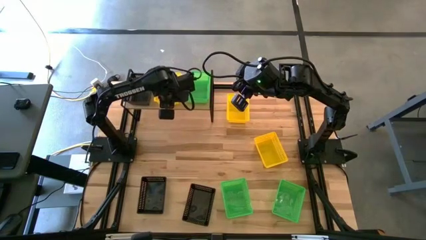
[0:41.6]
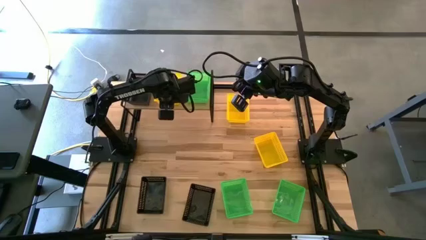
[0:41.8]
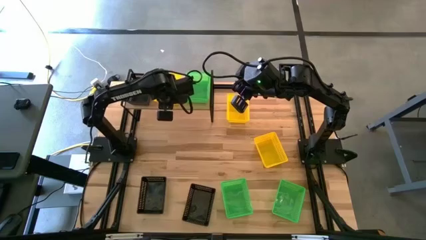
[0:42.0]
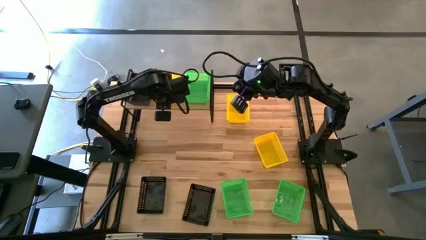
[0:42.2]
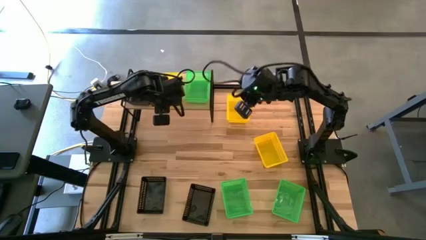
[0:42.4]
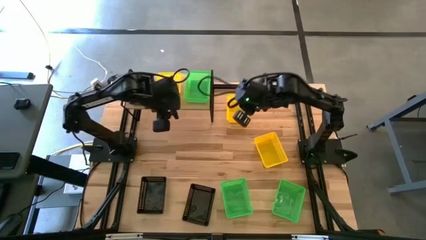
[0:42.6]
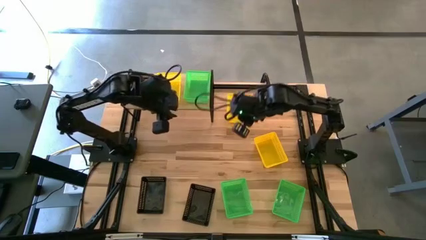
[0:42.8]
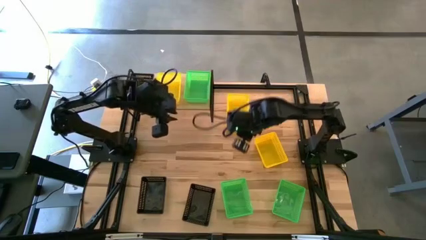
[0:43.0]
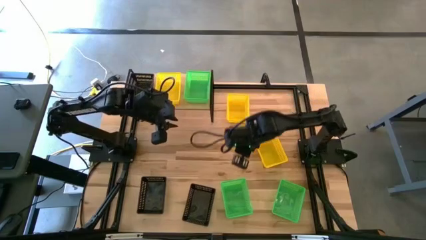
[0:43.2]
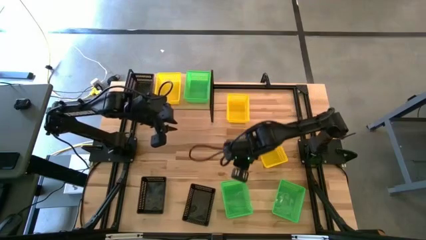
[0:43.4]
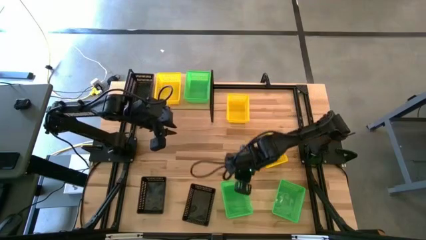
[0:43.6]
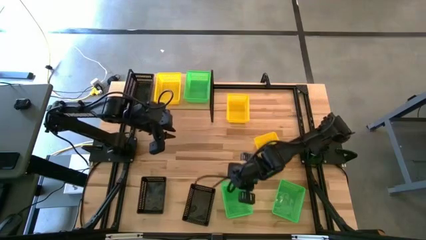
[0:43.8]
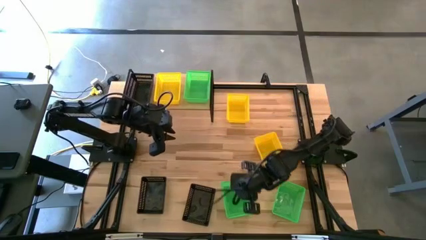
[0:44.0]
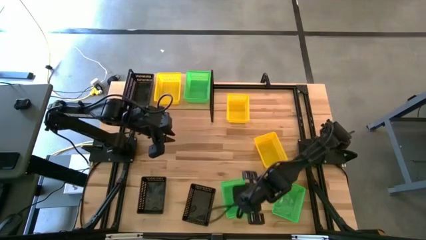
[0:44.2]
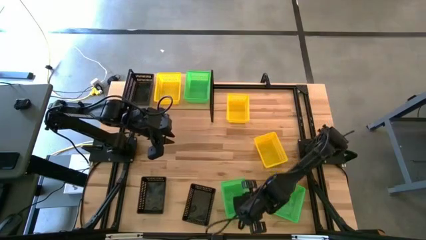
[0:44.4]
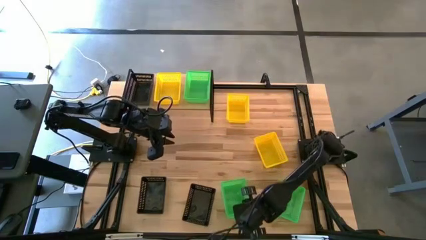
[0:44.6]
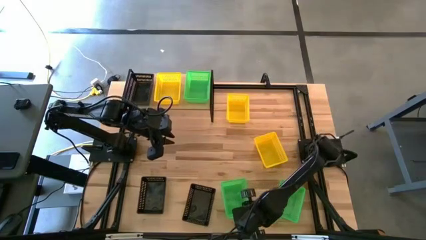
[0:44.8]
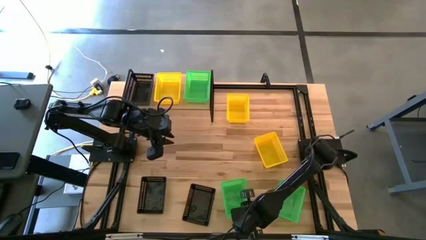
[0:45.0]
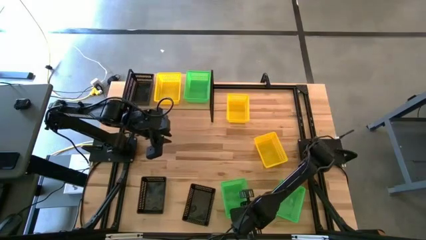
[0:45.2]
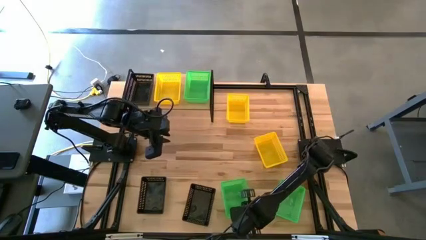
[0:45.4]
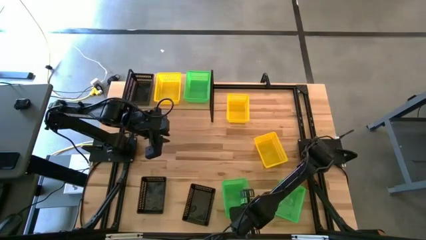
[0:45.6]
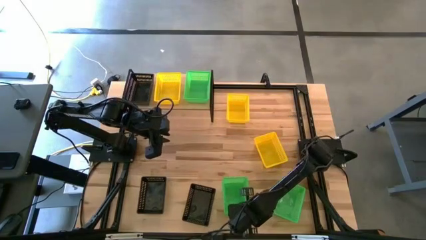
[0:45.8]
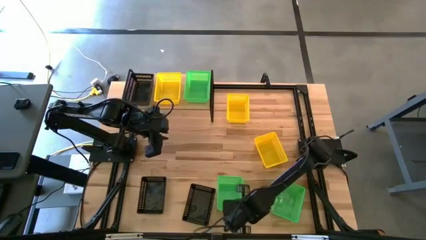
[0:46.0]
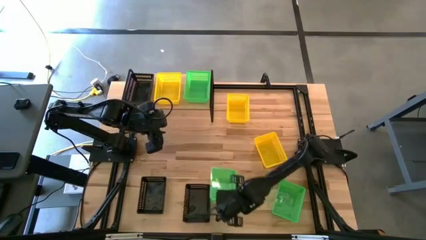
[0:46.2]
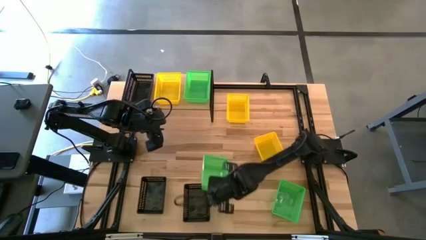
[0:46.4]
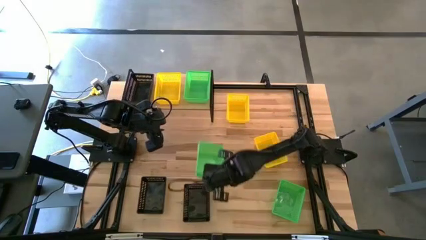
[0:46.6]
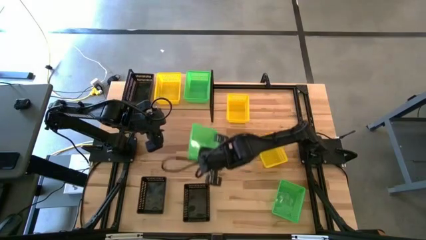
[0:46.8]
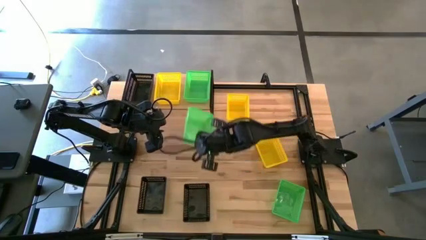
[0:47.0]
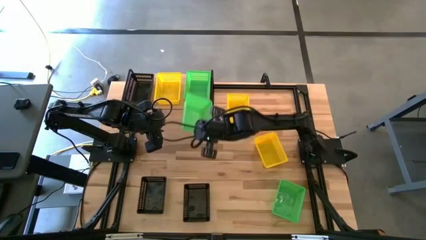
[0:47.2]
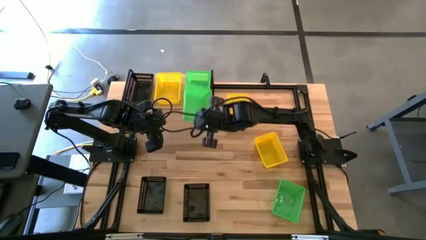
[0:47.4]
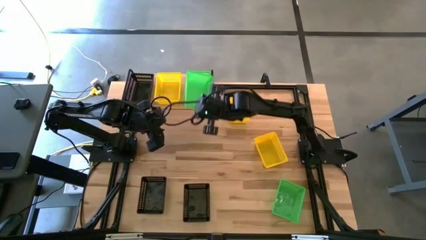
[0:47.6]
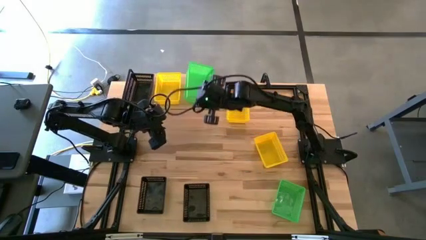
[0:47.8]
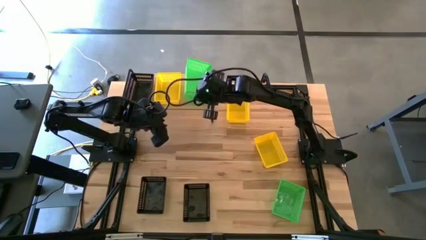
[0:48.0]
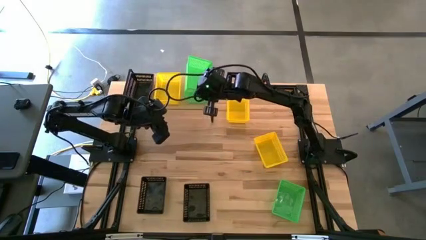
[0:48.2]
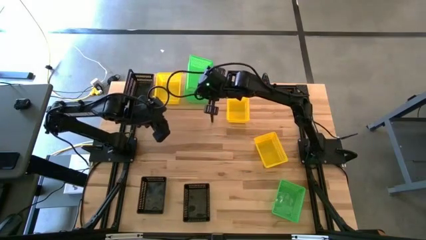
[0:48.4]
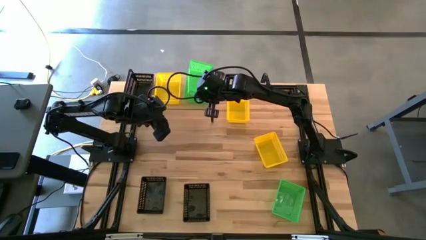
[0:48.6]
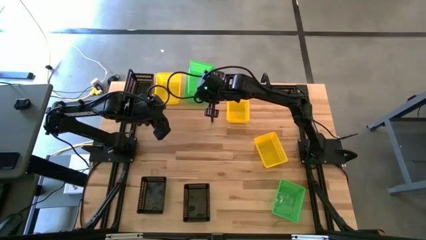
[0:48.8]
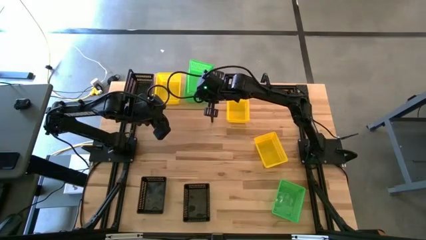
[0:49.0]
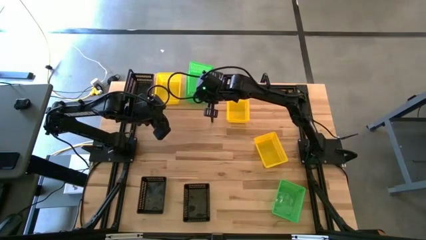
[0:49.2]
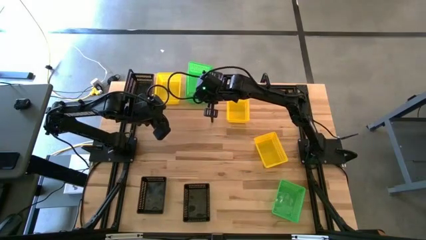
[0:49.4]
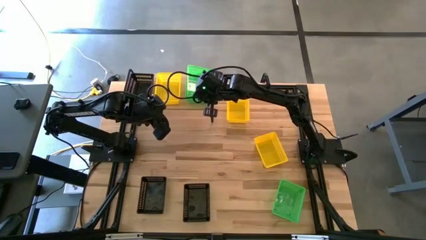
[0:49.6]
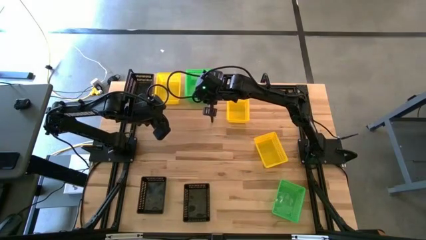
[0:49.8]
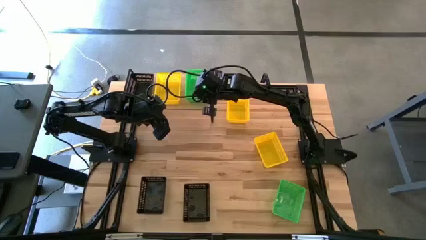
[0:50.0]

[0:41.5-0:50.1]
Task: Stack baskets on shelf by color
Stack the left green bin on top of the green bin
